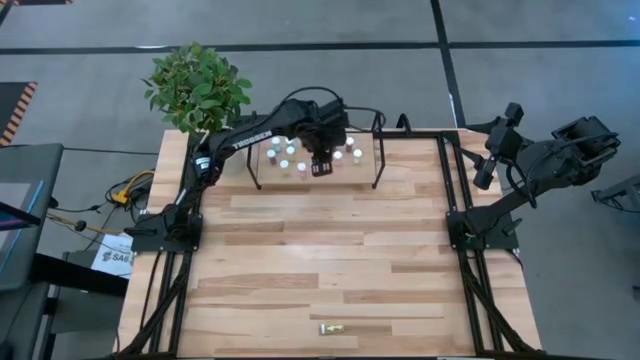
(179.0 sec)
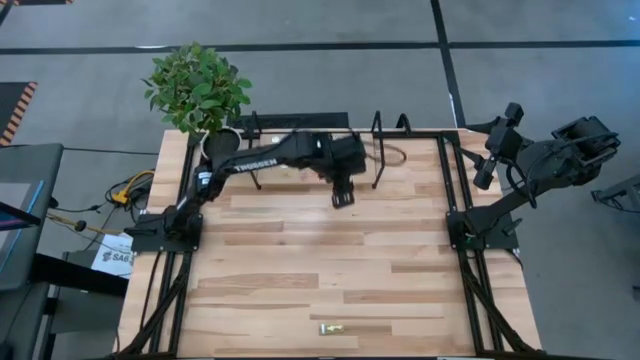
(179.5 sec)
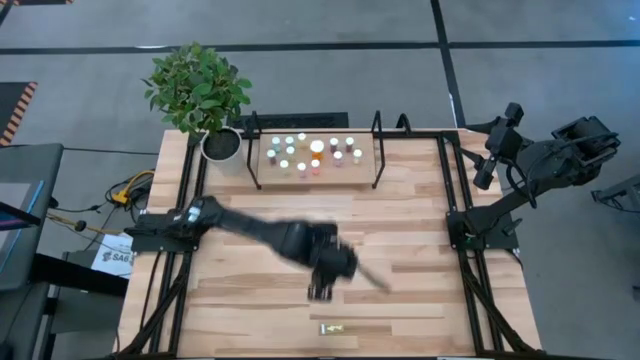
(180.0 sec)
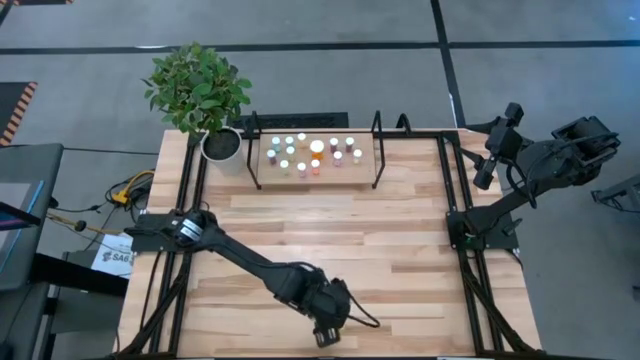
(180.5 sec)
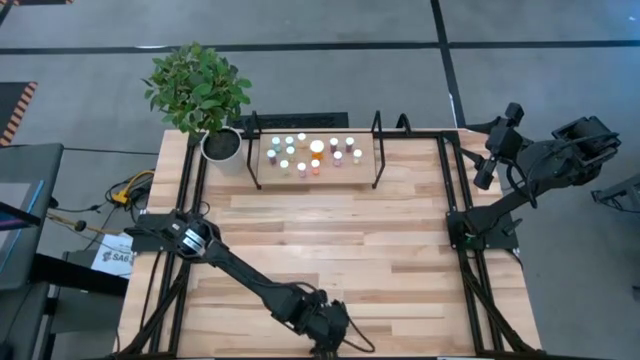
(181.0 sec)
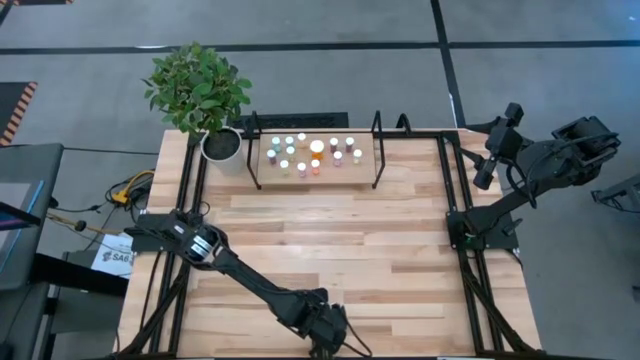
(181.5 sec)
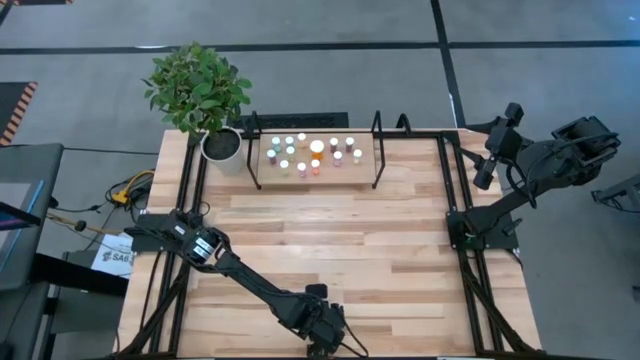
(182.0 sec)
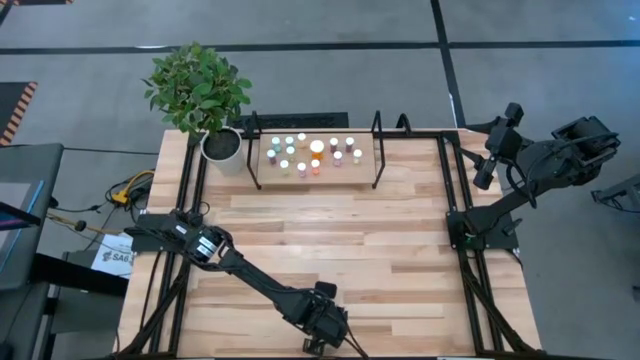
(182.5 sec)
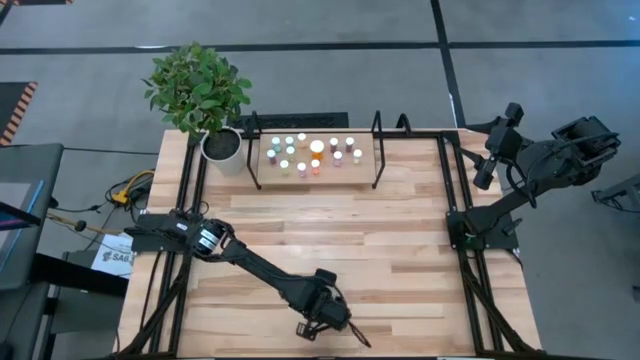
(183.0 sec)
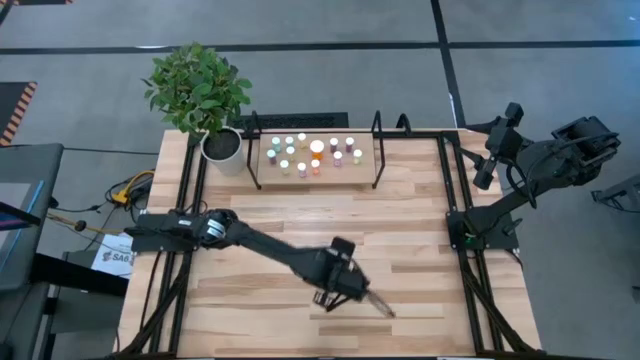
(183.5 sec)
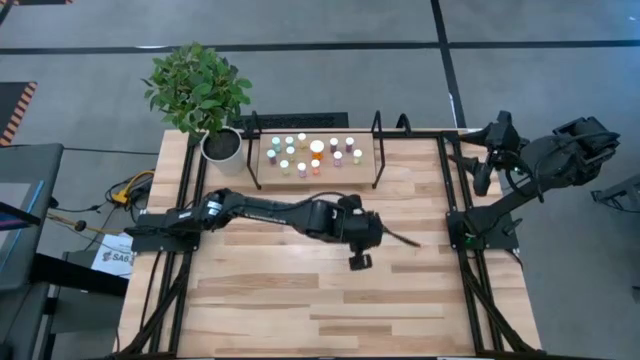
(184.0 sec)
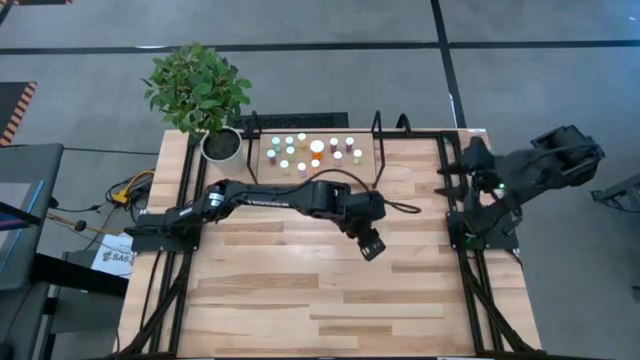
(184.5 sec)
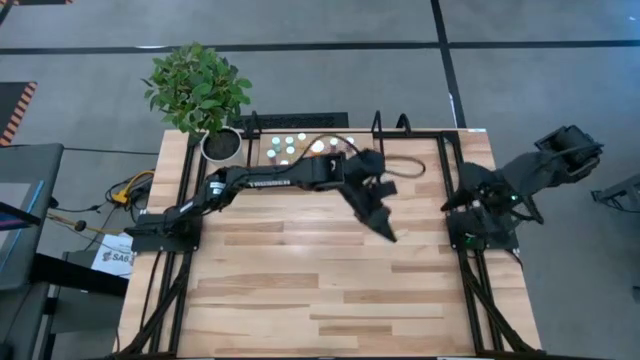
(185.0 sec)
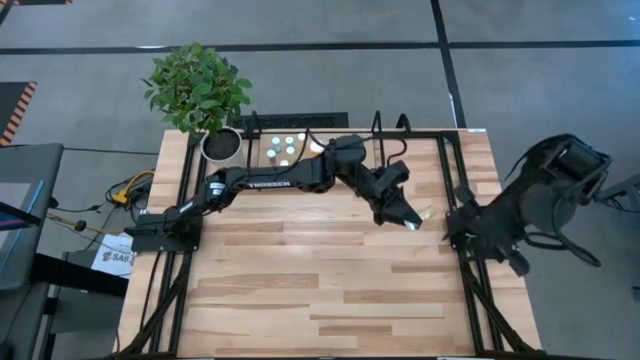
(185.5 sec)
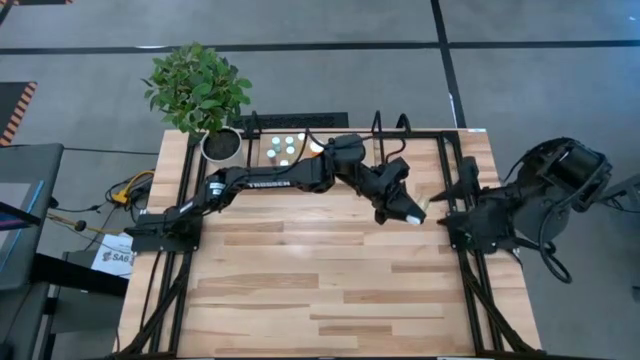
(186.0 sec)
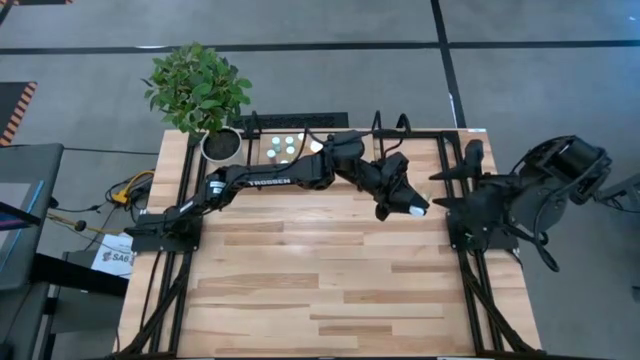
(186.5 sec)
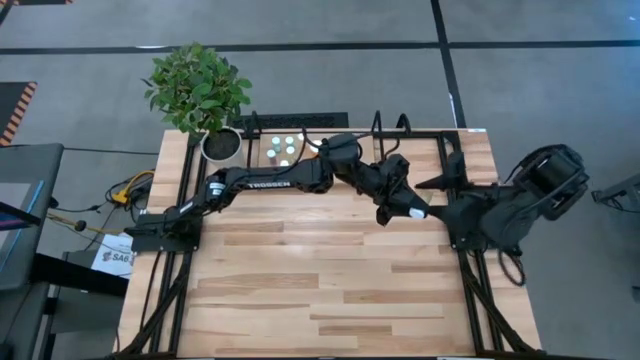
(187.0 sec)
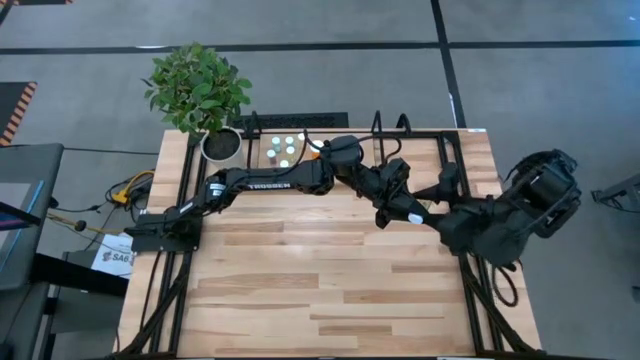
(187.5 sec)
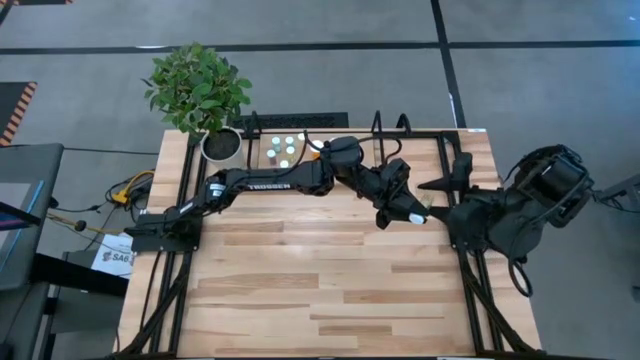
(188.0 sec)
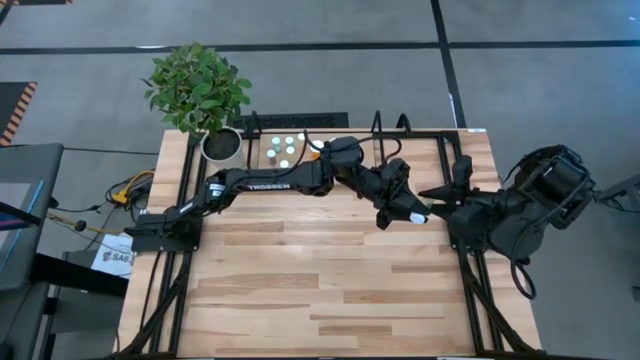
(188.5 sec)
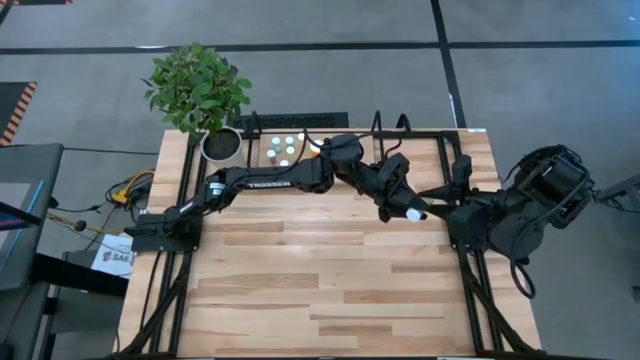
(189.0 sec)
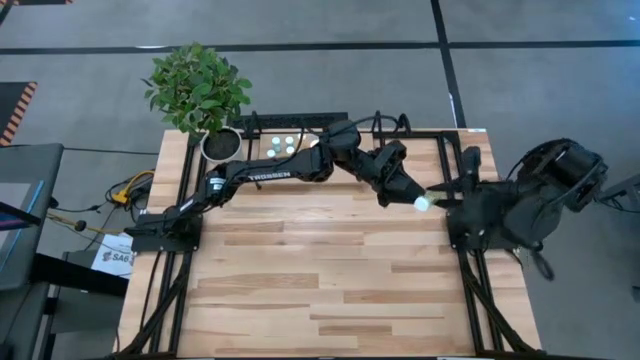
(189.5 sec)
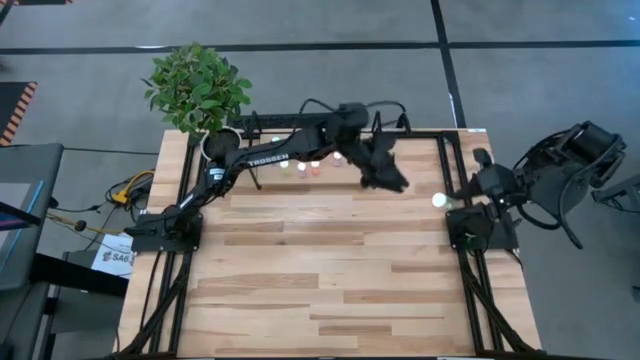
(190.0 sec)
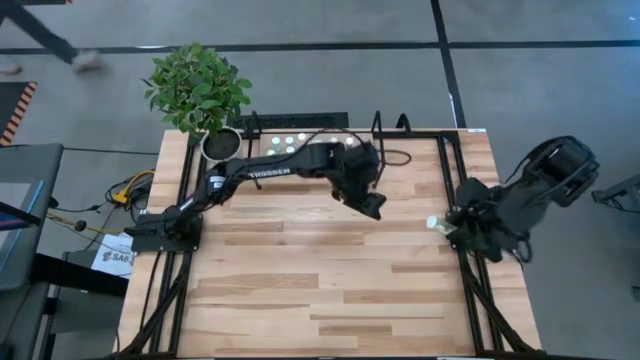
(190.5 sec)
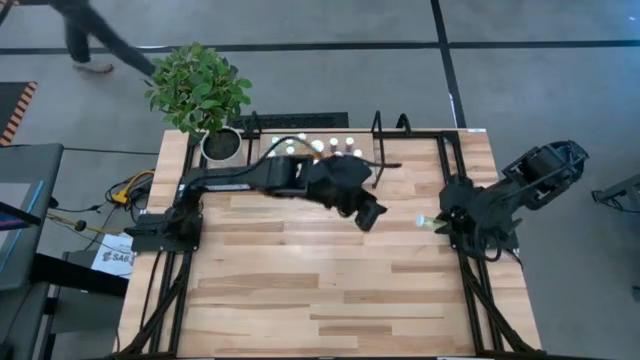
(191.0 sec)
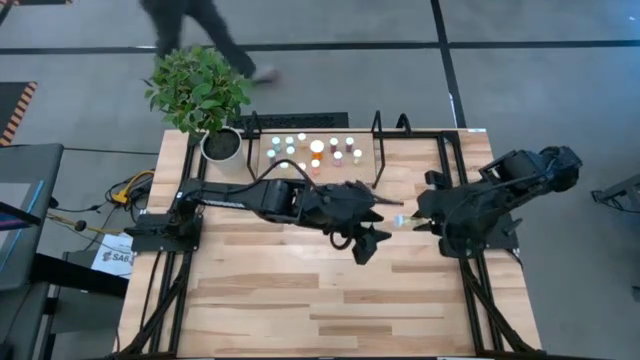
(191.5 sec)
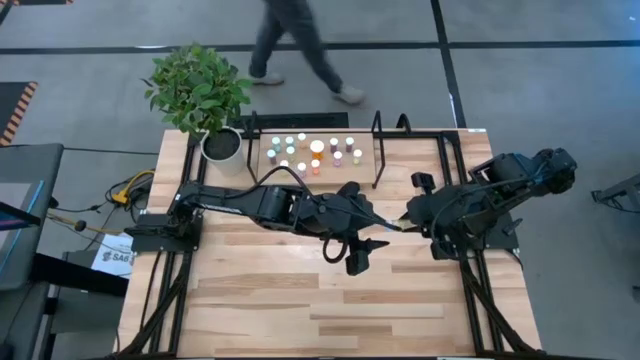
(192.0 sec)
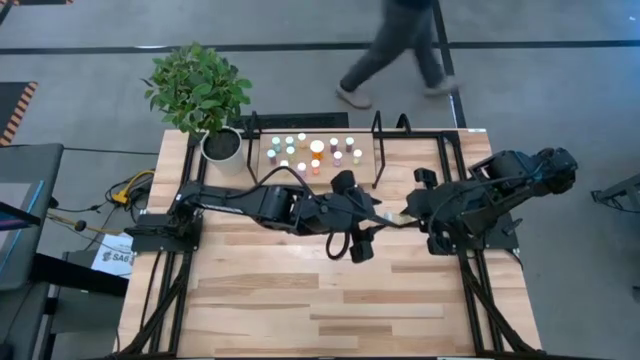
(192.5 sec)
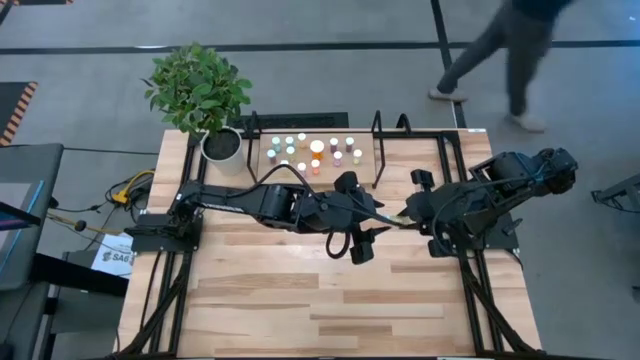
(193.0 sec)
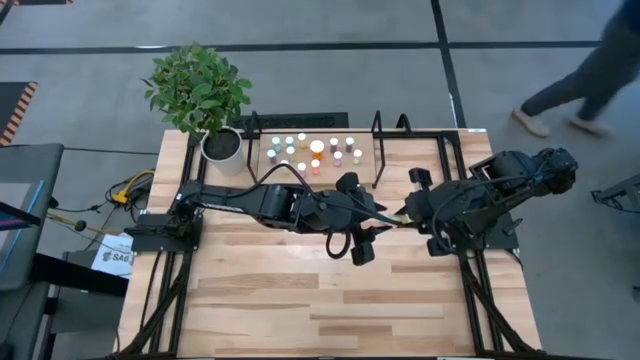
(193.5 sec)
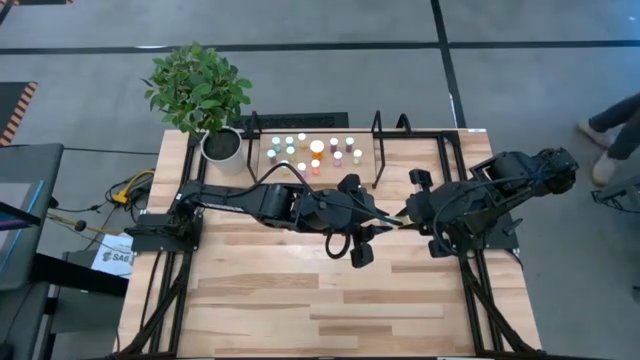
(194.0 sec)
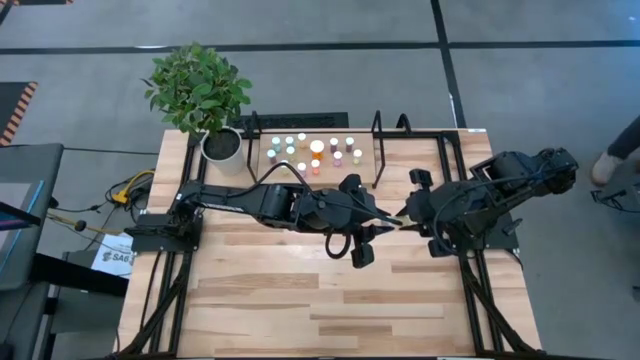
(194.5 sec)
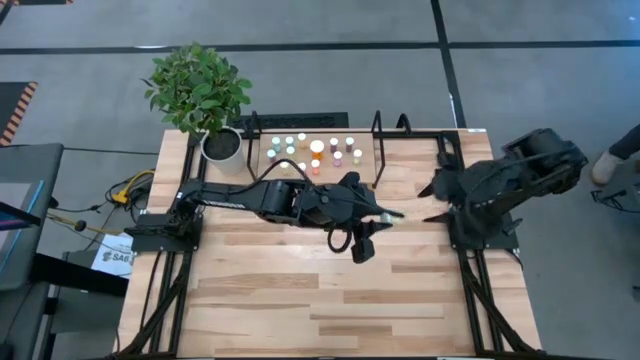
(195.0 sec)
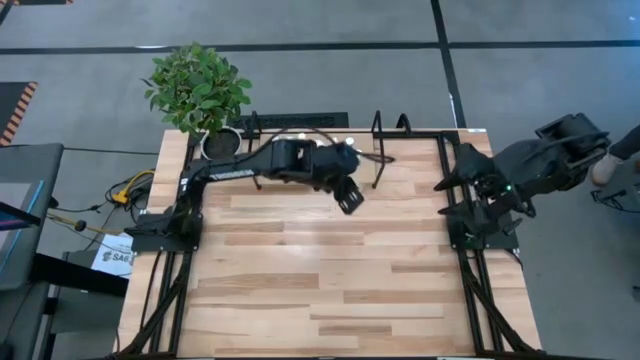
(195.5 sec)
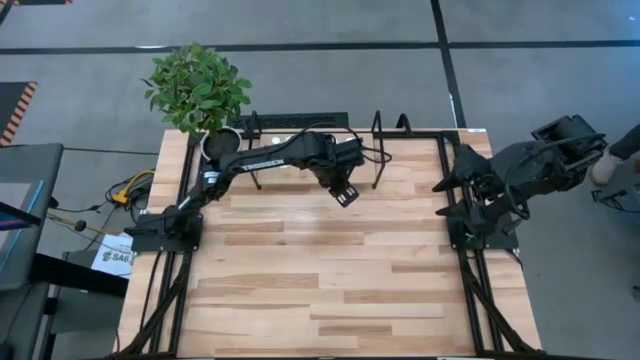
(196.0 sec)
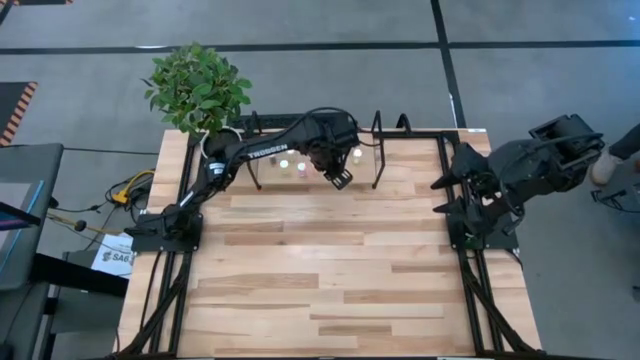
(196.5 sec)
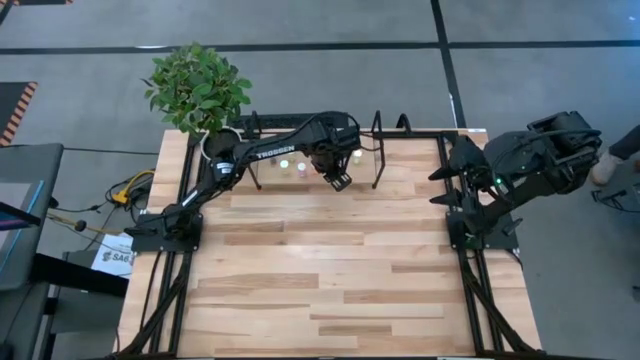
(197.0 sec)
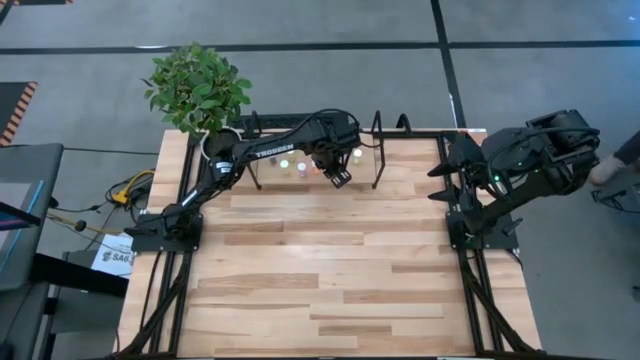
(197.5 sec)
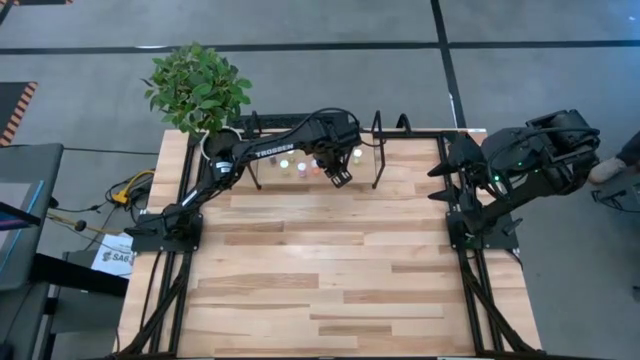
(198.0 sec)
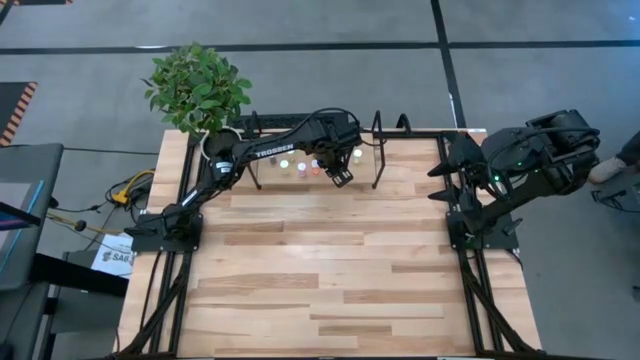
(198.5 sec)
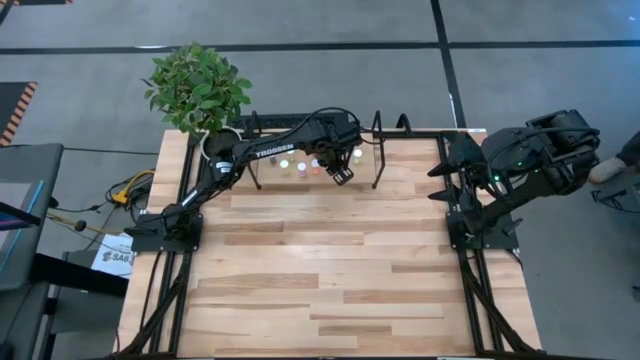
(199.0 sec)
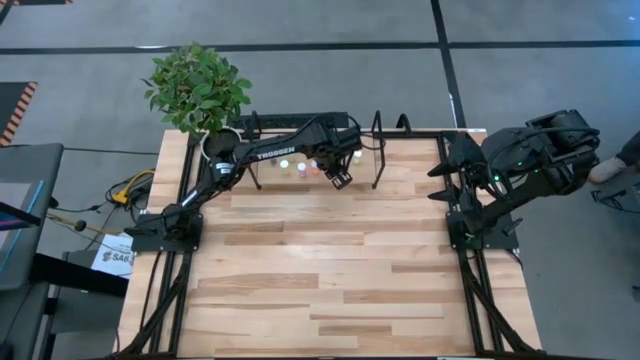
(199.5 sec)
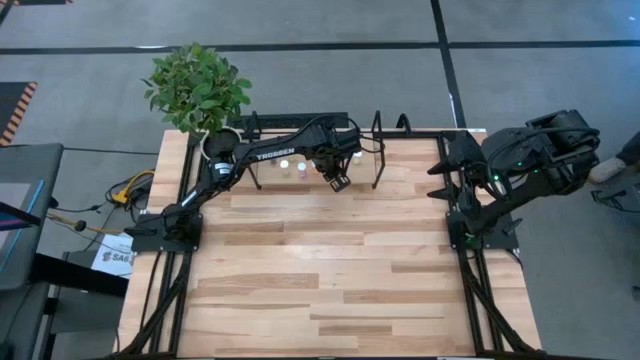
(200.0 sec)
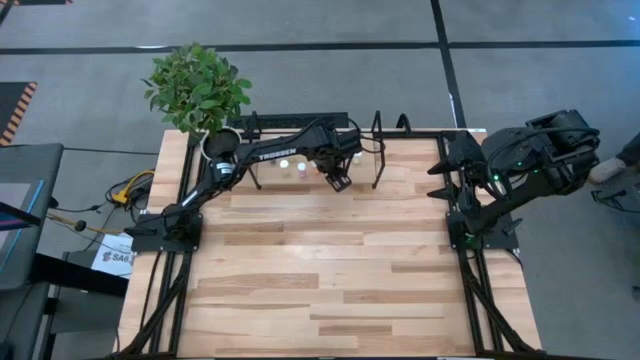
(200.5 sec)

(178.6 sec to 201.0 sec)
Task: Pick and place medicine bottles onto shelf by color
Put the yellow pill bottle on the shelf

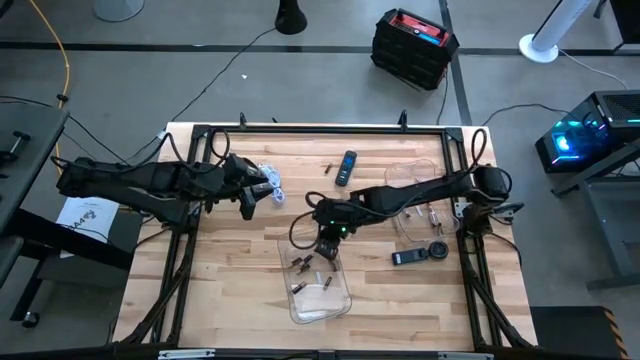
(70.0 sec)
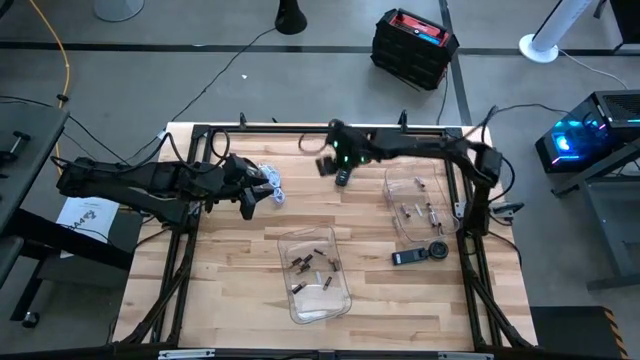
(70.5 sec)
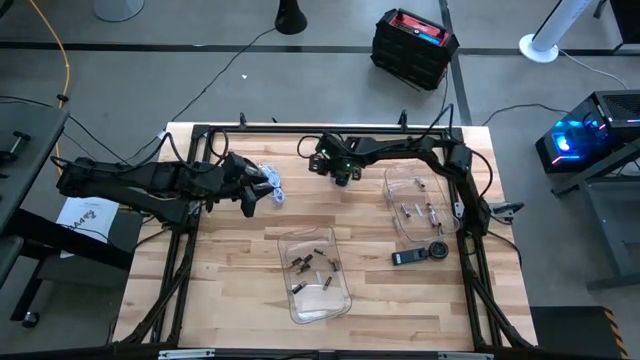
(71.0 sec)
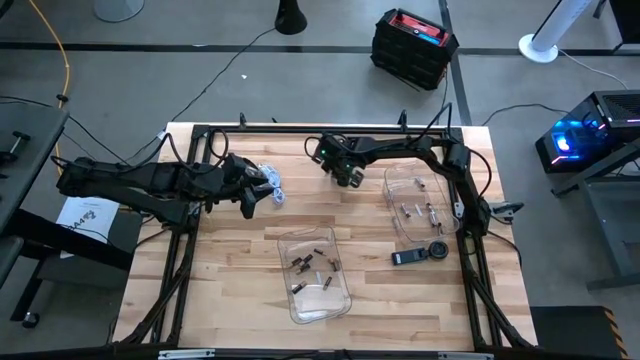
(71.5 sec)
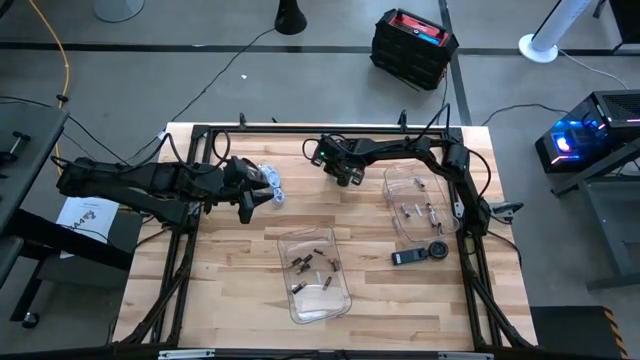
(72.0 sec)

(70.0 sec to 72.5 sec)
Task: Sort batteries
Put the black battery into the left transparent bin
